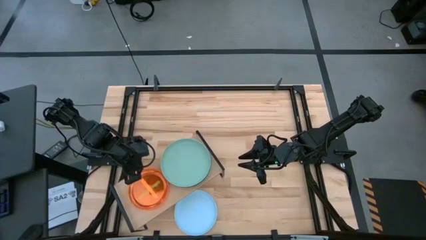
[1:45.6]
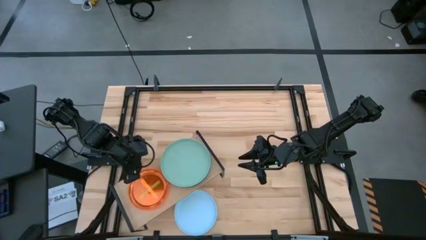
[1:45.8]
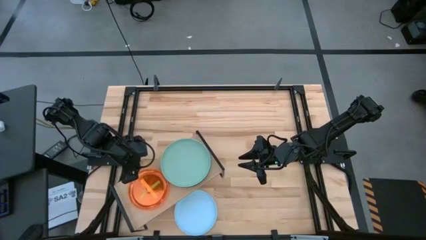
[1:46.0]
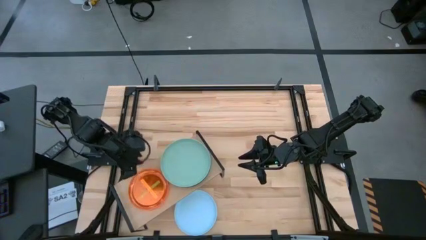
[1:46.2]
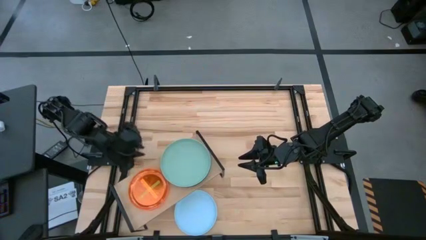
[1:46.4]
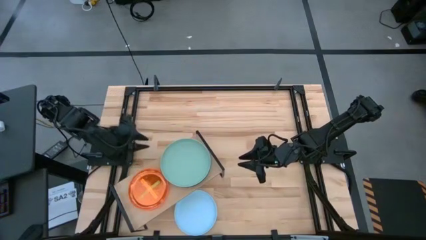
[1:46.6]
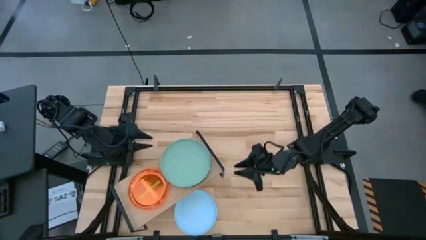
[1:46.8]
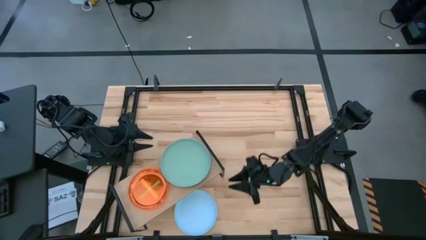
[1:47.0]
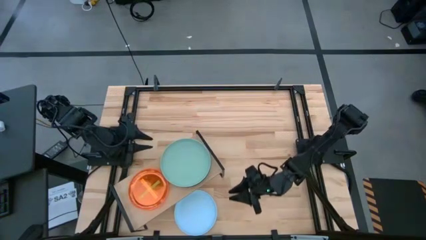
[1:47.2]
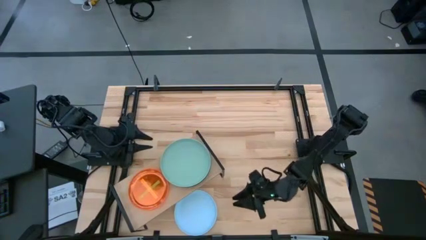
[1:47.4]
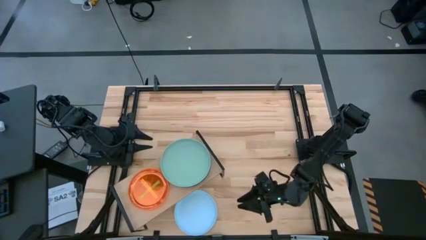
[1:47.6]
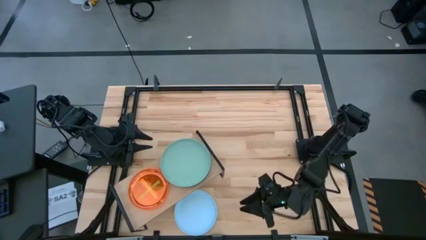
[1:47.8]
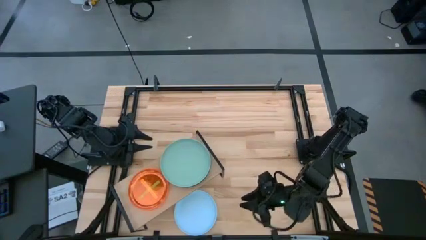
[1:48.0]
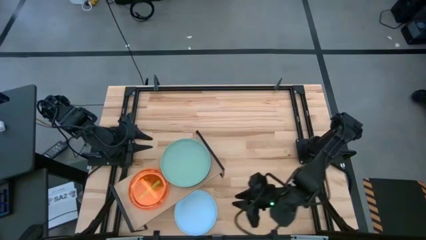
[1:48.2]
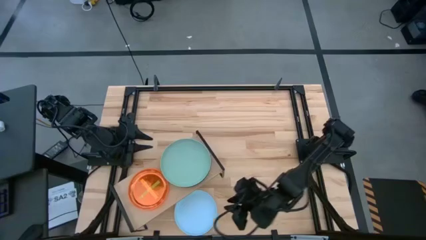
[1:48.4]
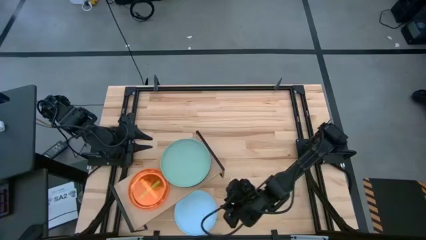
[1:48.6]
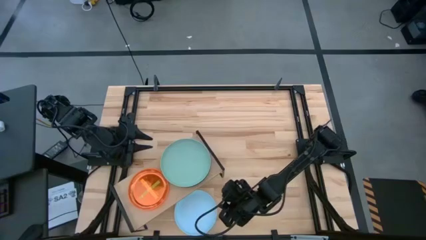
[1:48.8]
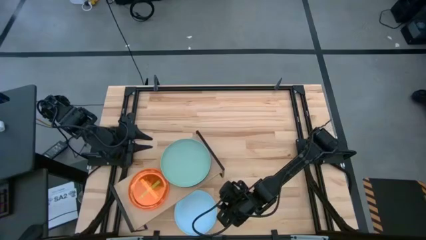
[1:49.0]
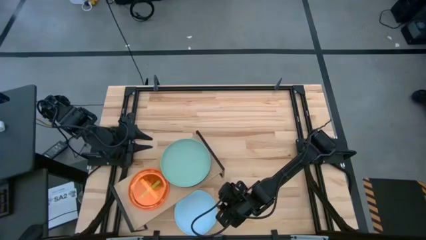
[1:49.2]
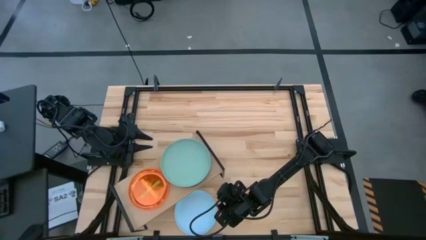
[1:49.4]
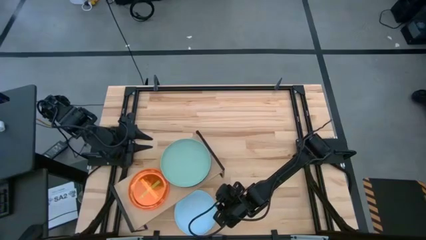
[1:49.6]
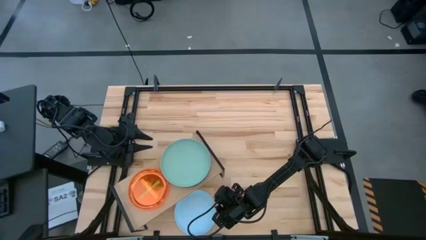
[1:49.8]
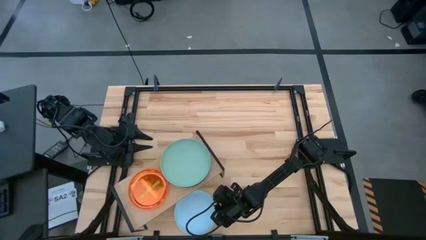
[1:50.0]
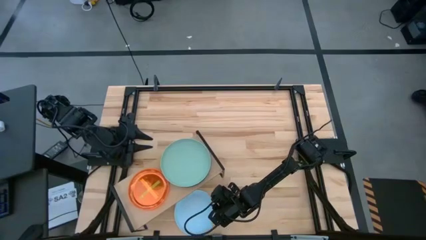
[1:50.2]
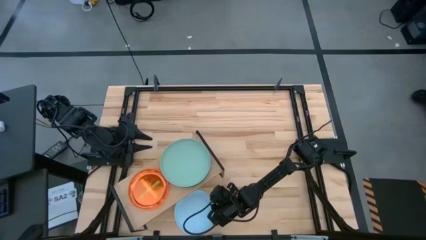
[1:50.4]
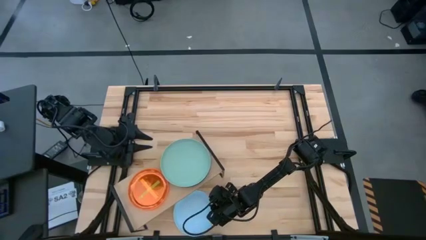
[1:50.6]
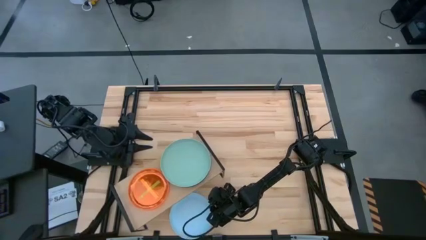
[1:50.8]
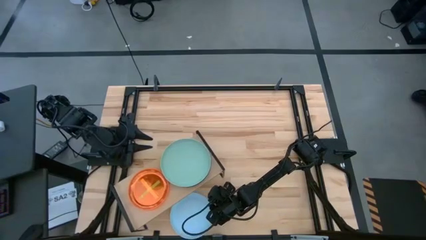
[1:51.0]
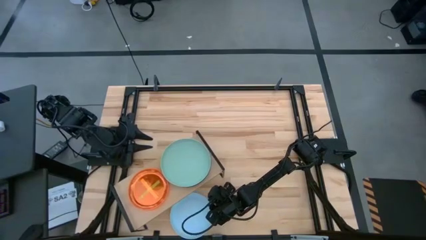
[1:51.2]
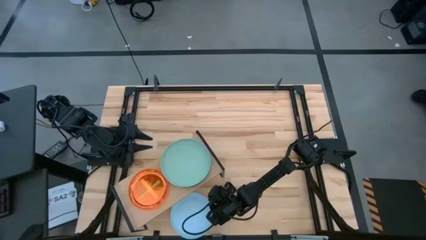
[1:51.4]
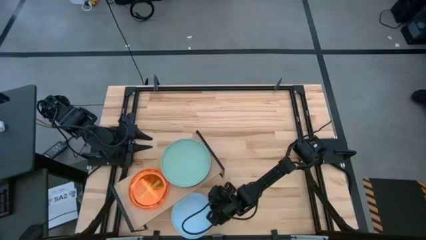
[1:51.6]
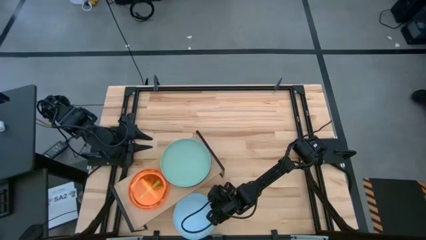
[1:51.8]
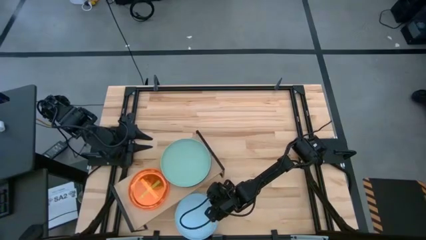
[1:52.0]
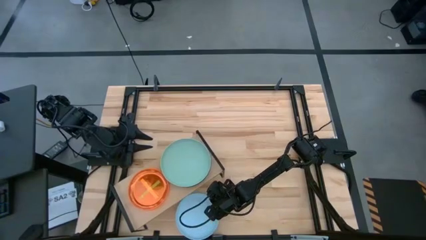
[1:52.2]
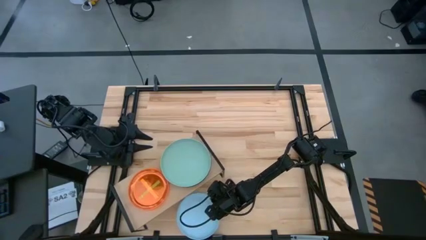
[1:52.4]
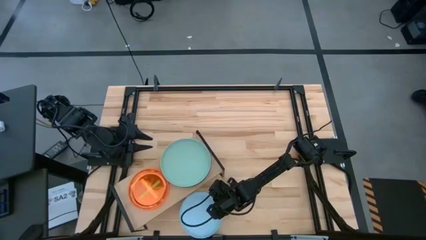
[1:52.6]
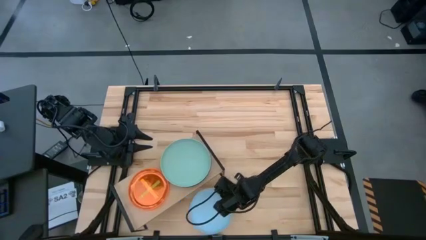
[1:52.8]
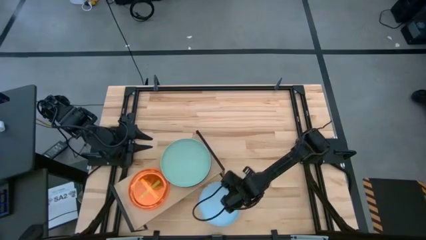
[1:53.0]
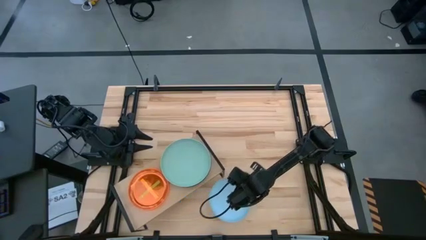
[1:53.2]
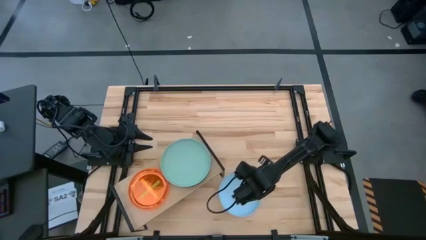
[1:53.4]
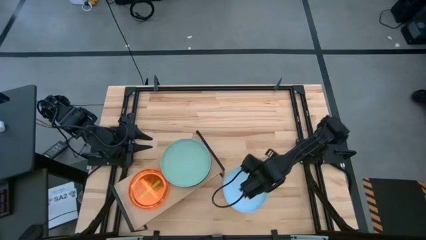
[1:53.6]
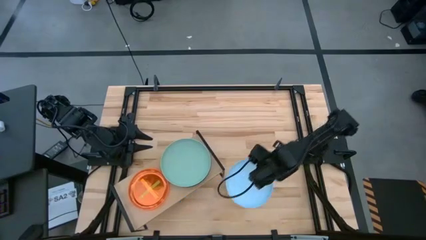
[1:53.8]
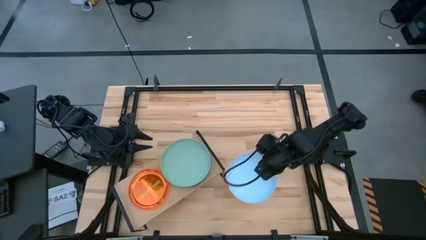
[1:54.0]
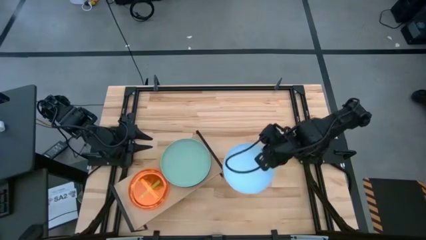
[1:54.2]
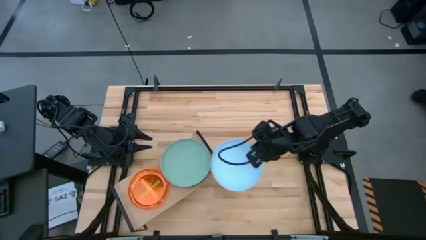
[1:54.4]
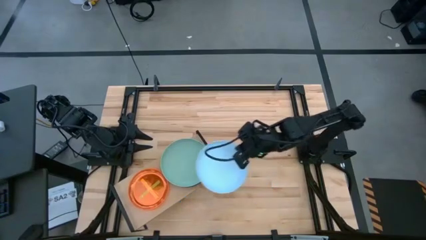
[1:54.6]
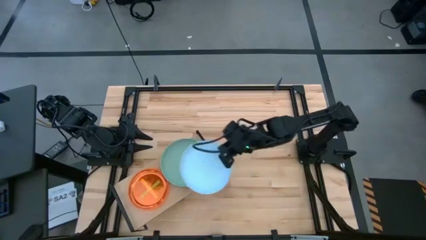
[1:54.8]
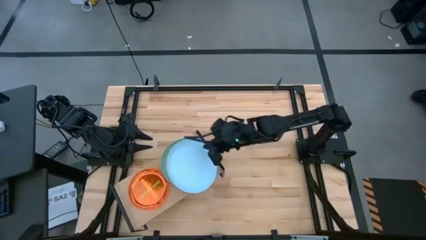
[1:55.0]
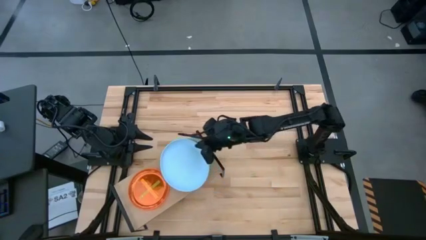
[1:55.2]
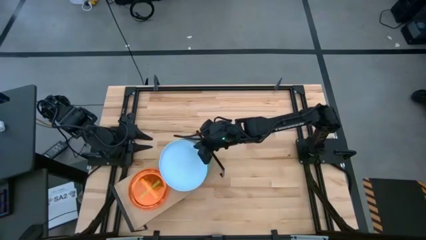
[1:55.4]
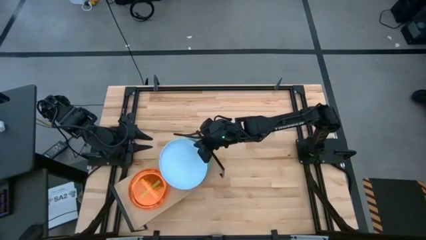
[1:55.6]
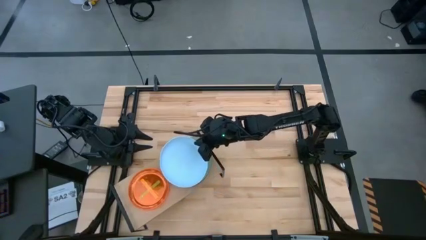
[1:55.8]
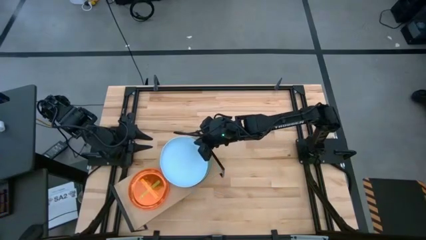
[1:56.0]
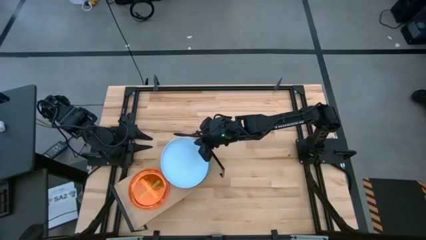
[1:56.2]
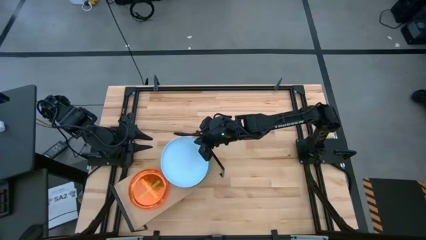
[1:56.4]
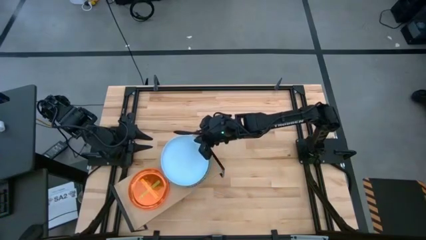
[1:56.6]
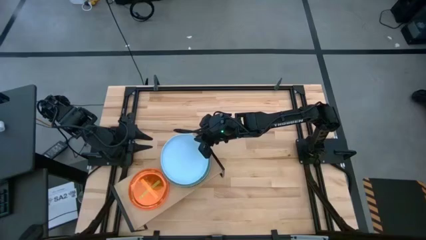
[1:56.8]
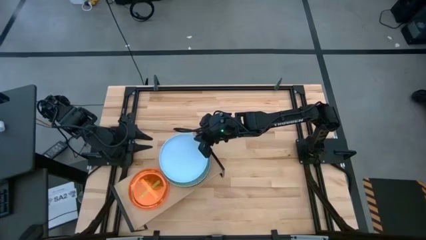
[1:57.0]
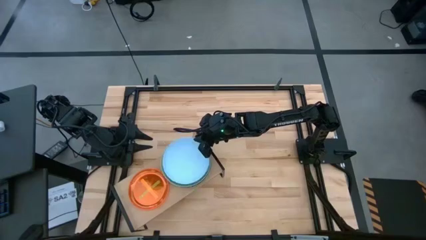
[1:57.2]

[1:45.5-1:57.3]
Task: Place and stack plates onto a shelf
Stack the gray plate on top of the blue plate on the shelf

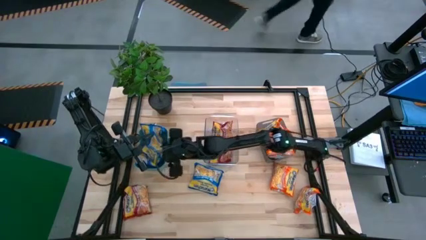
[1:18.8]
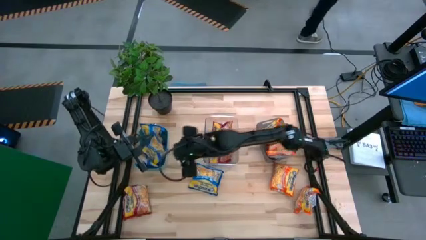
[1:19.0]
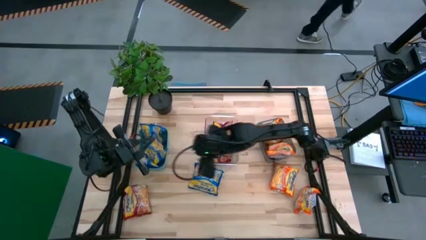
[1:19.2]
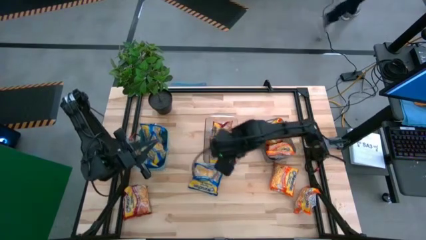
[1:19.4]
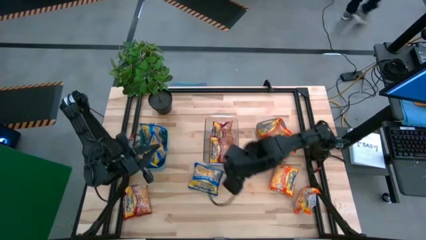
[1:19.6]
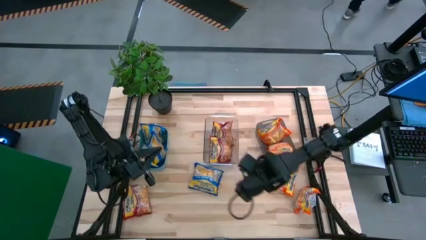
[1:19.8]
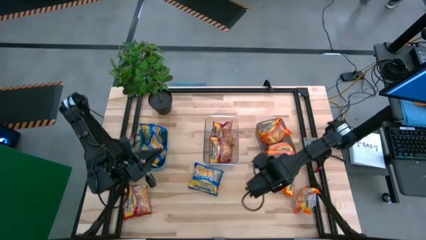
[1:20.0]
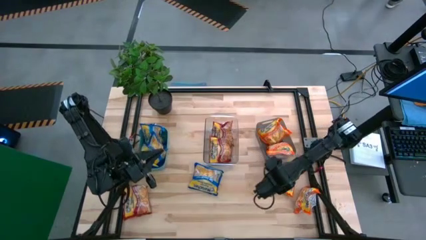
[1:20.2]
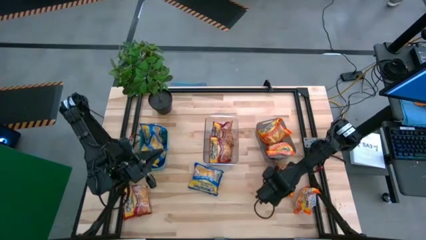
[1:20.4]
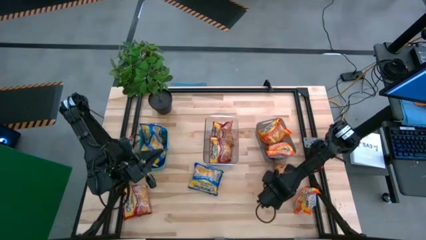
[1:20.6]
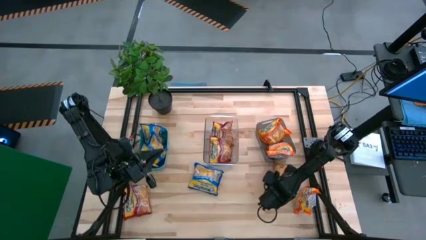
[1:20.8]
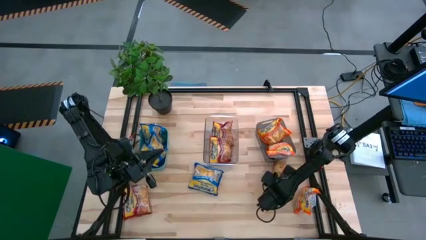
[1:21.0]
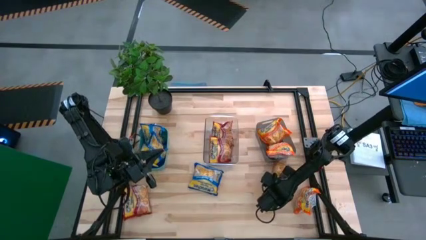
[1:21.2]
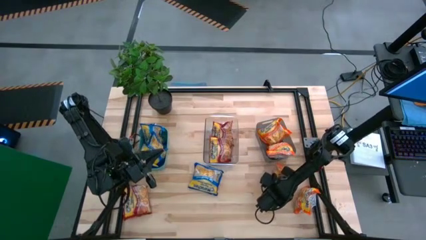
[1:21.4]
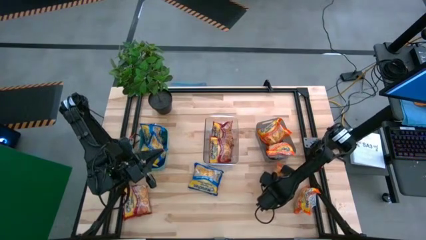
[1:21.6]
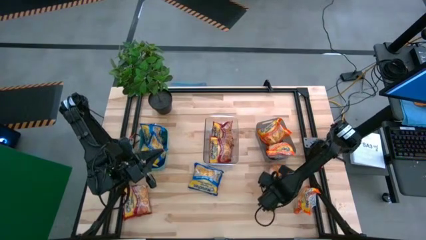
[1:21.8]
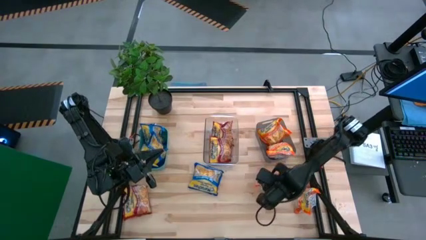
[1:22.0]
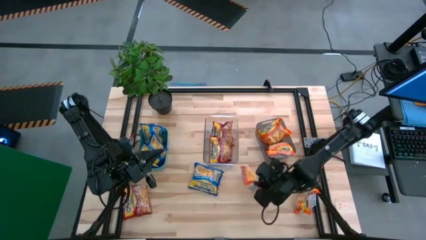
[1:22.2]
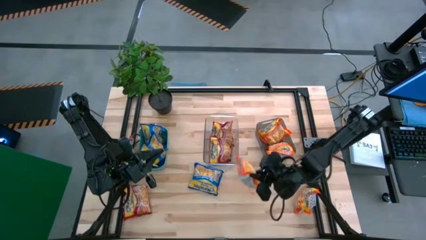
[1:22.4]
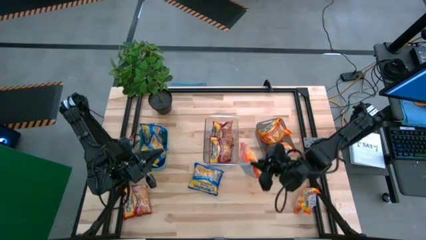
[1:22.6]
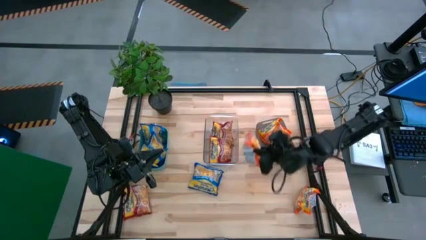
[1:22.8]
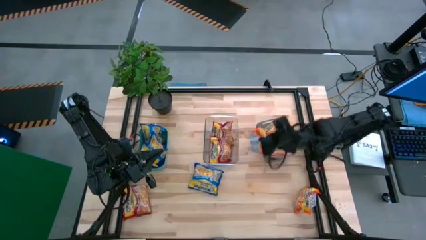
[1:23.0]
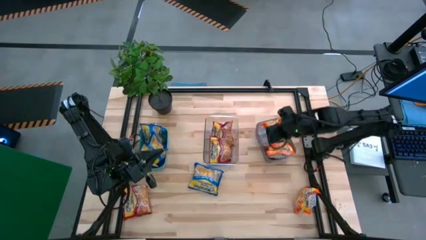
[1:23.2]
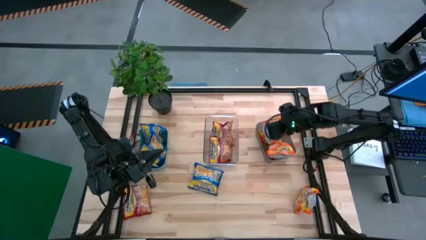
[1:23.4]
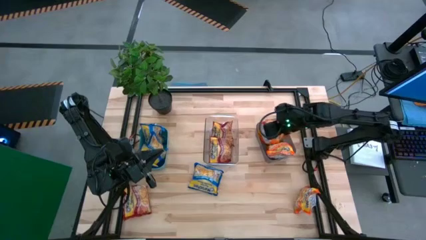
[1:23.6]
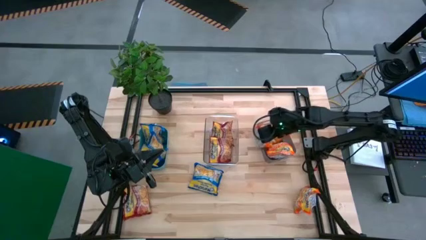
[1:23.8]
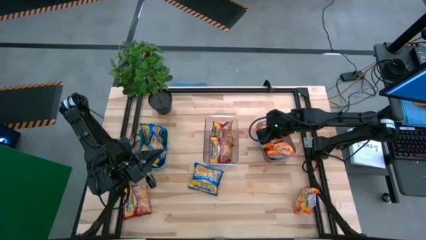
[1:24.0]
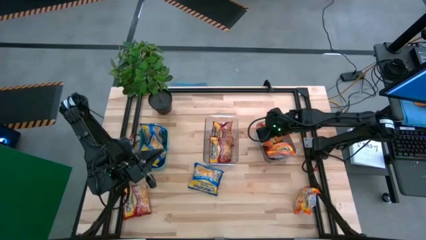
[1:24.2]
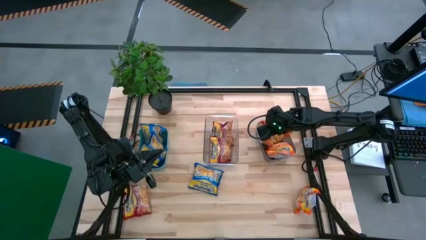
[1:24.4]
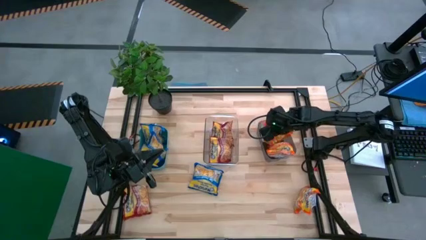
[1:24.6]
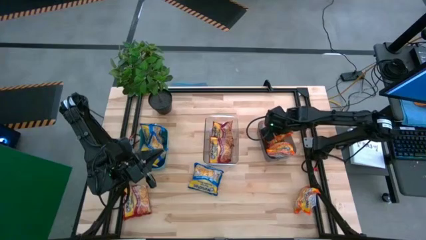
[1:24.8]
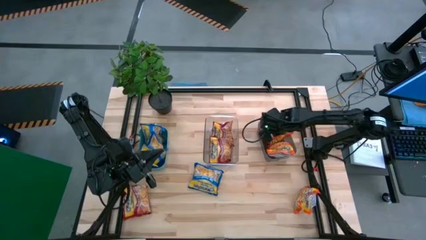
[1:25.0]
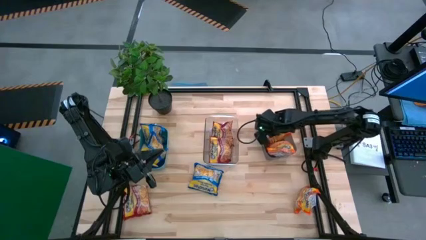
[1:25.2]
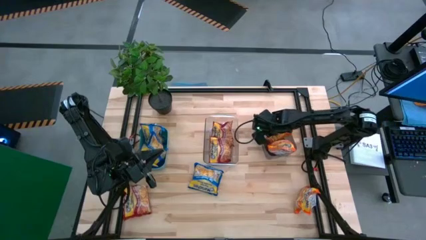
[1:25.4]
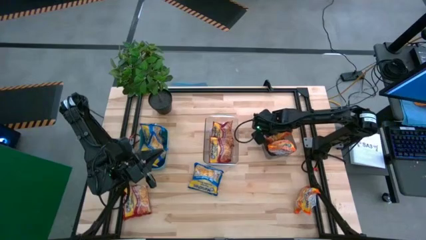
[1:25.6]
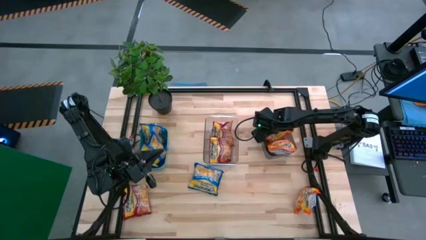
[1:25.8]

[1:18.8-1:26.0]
Task: Sort Maruchan noodles
Put the orange noodle pack into the black bin
